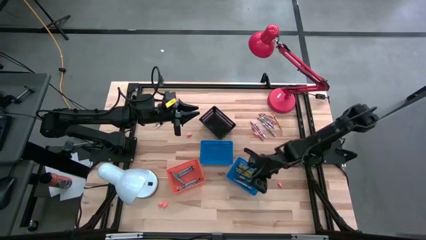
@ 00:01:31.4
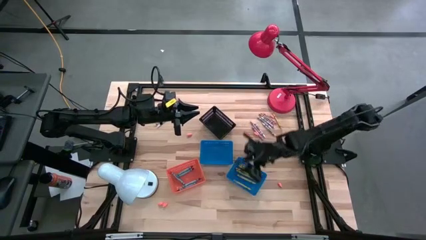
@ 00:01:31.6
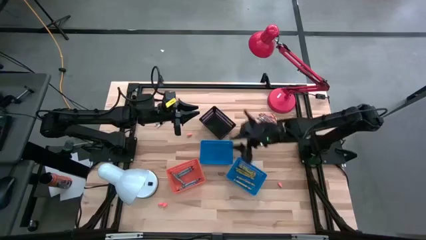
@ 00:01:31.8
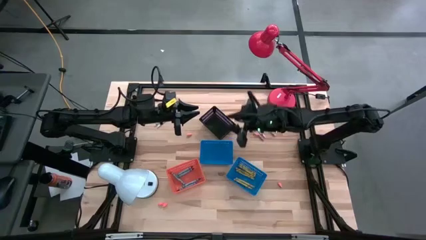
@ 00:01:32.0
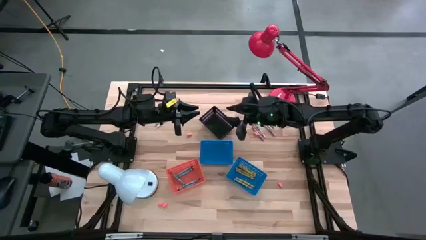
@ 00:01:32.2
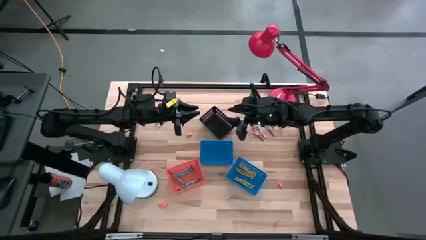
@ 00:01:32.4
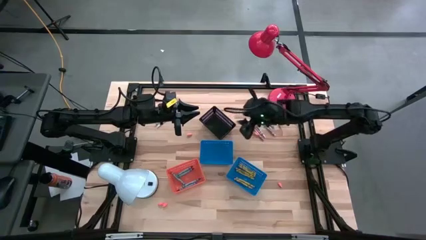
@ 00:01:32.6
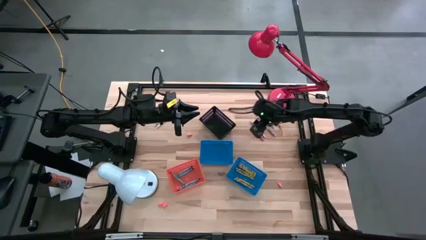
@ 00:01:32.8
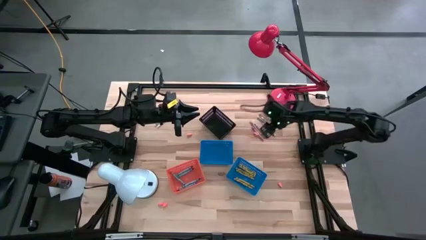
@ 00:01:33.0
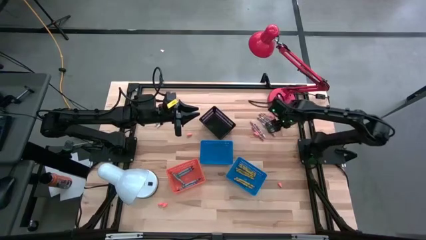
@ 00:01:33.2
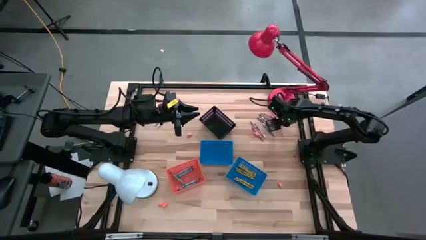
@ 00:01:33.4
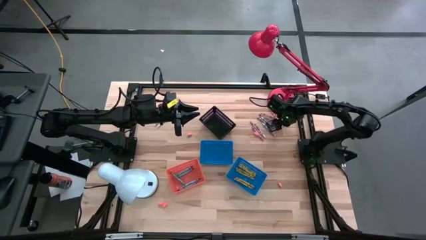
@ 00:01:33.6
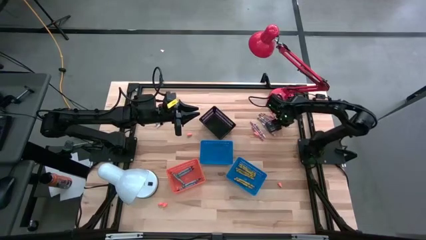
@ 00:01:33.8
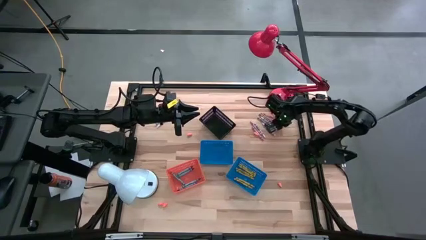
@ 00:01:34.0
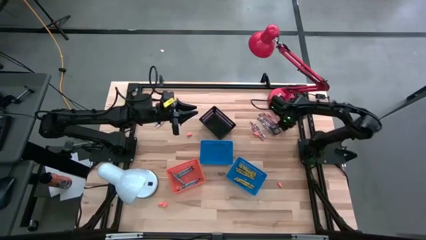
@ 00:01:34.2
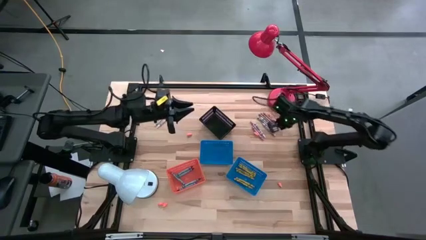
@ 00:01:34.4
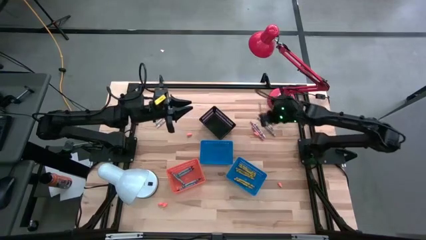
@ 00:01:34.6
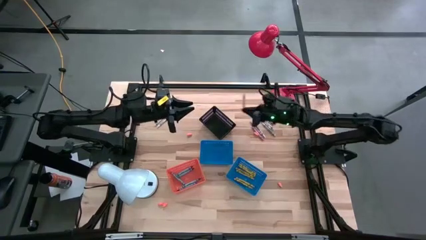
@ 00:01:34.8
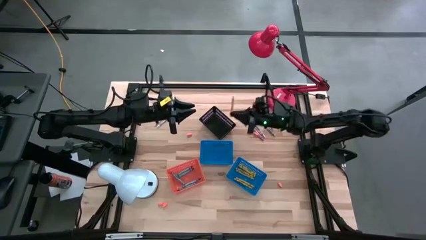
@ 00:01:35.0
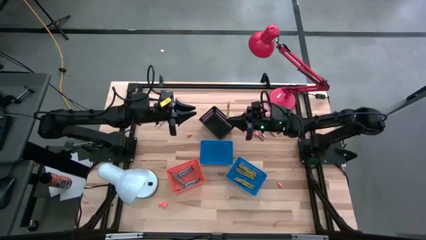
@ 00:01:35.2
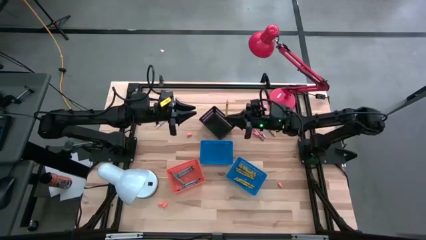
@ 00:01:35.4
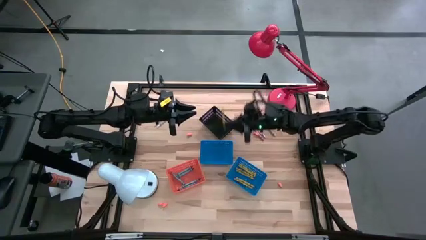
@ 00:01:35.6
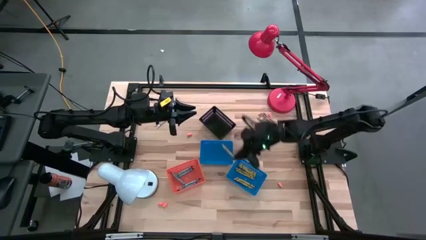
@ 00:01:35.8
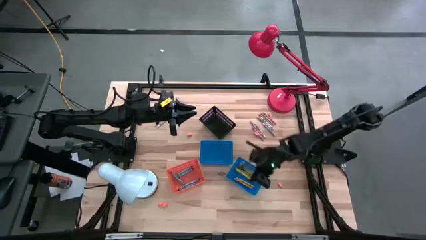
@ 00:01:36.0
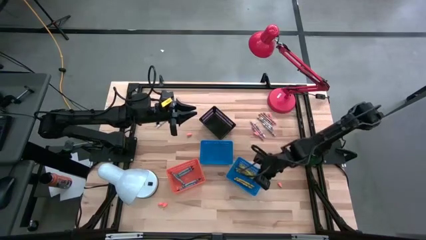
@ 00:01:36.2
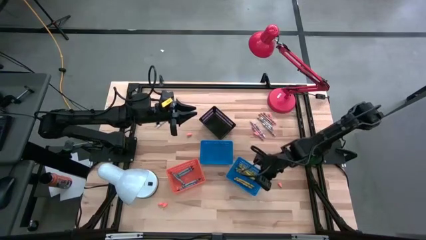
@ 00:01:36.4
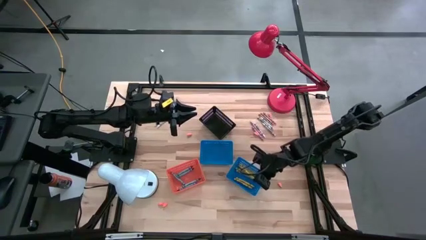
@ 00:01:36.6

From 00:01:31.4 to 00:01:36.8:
Task: Sort crayons
Put the yellow crayon into the right blue bin

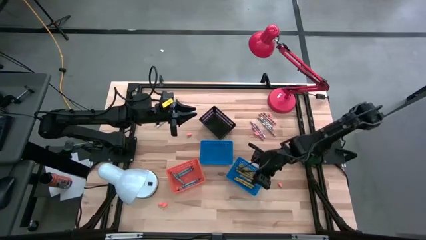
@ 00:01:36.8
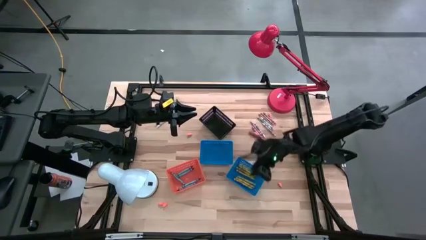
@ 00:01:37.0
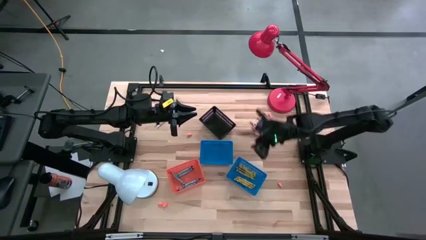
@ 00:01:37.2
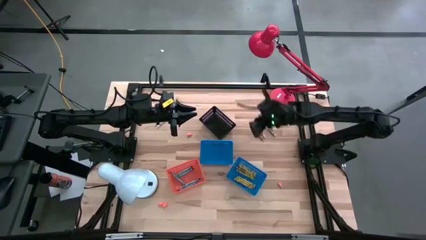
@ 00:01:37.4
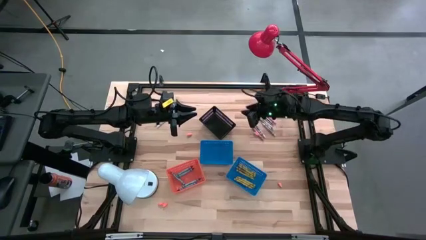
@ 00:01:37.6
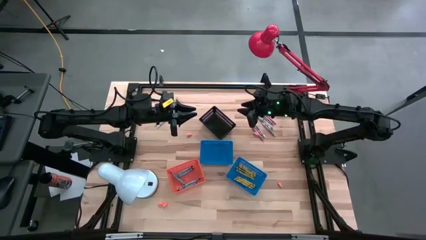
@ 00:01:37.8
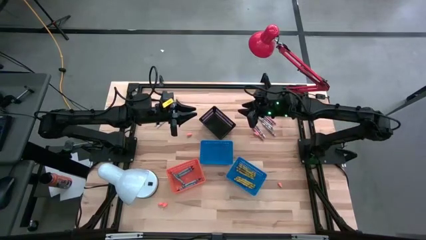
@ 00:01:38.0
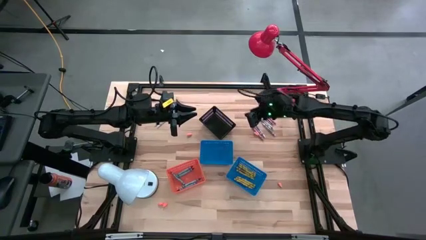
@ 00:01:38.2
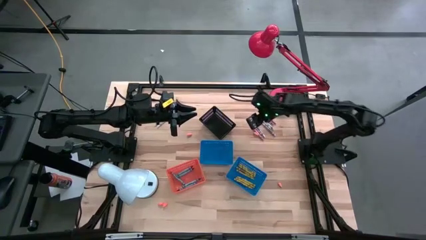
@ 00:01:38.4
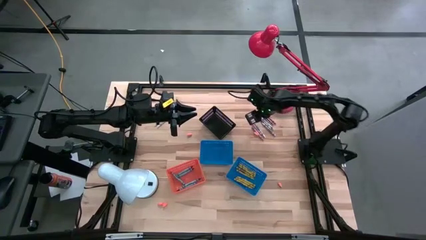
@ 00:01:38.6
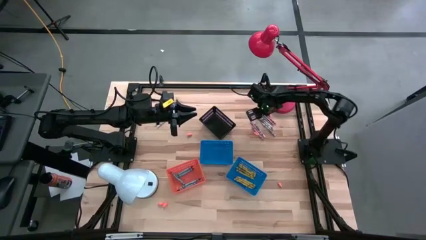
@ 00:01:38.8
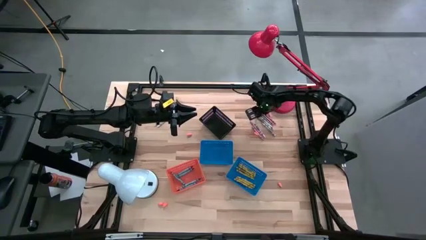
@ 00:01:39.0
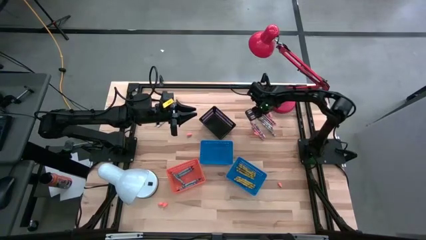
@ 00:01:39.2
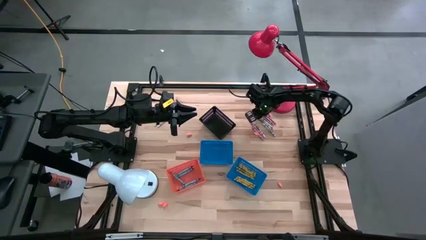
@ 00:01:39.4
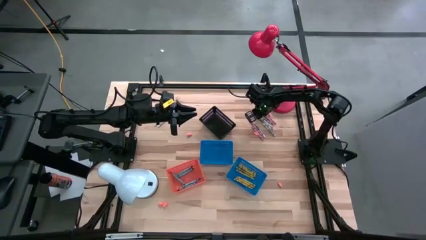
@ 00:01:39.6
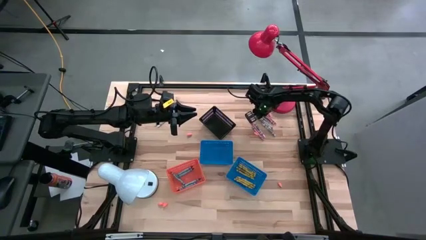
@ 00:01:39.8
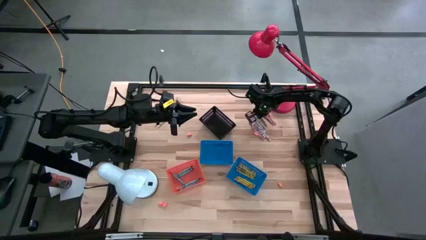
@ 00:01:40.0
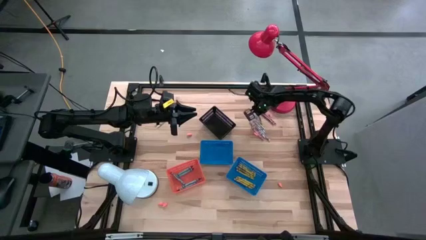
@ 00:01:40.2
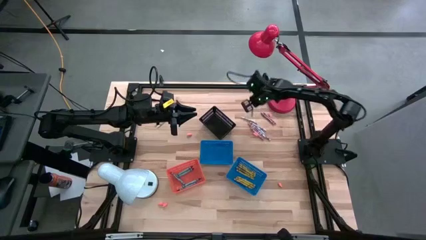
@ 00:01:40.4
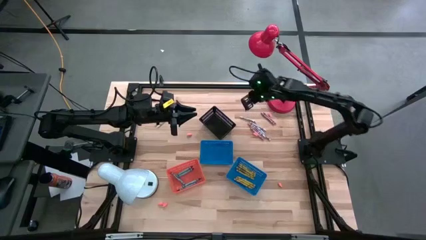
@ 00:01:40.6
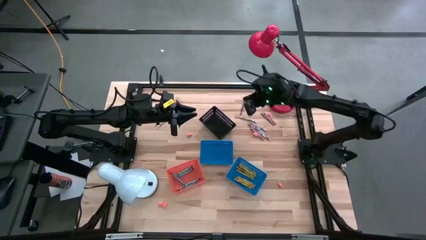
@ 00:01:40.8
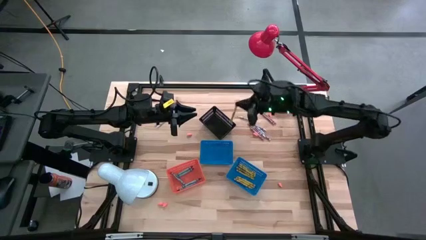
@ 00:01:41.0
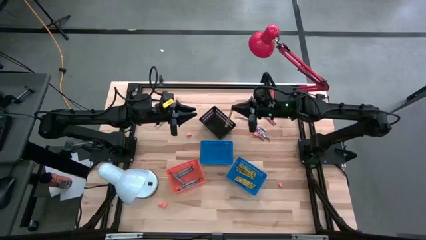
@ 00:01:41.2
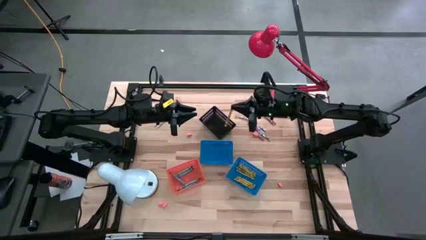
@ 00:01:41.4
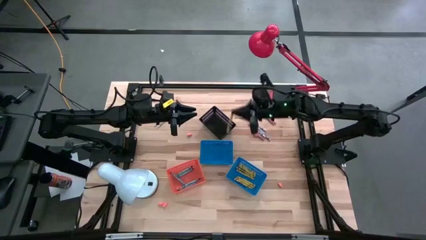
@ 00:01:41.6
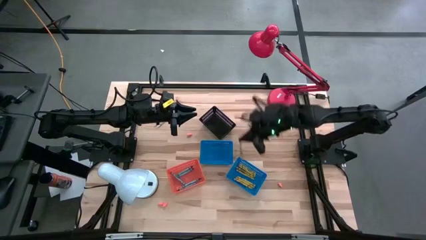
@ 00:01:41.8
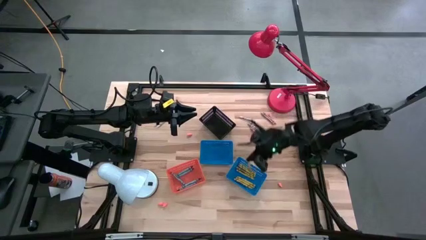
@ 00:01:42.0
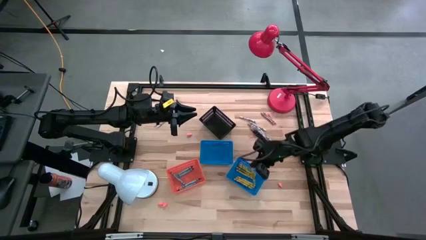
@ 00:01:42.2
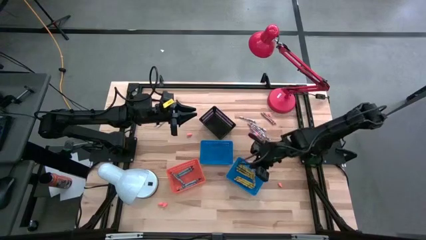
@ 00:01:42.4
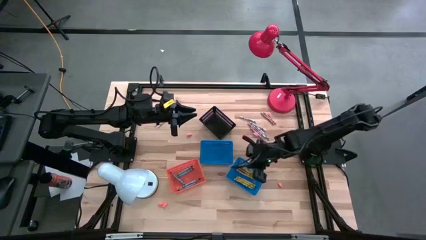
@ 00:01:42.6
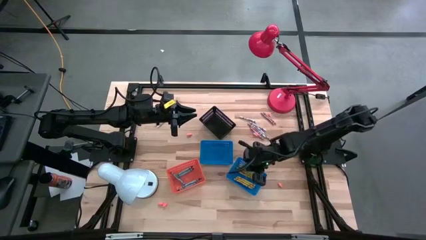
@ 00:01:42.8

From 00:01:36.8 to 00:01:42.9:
Put the yellow crayon into the right blue bin

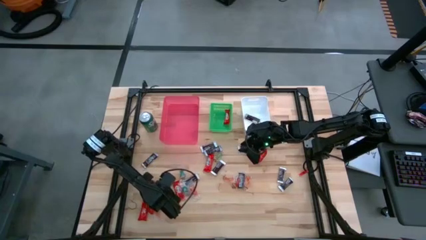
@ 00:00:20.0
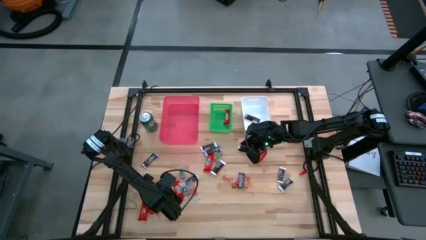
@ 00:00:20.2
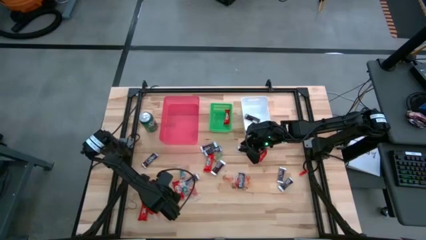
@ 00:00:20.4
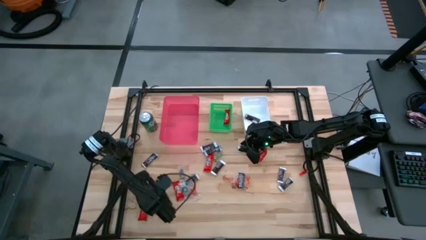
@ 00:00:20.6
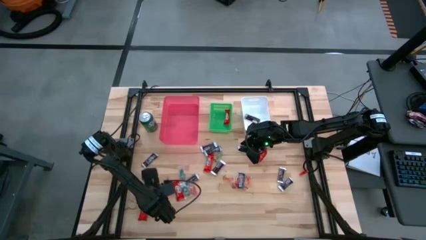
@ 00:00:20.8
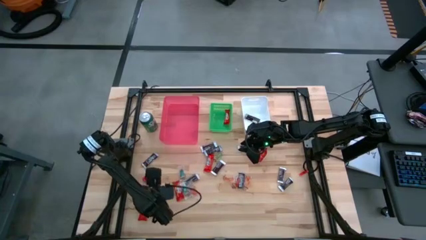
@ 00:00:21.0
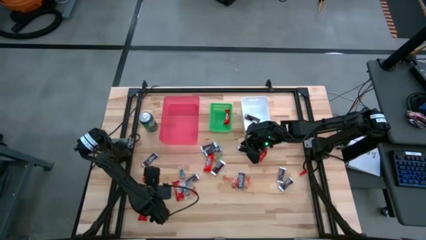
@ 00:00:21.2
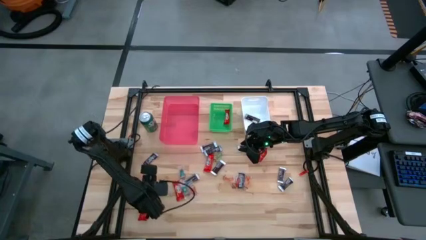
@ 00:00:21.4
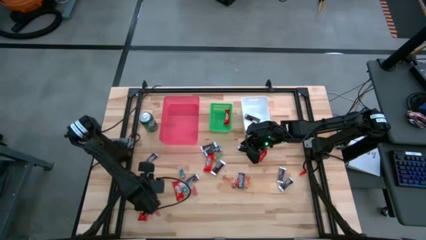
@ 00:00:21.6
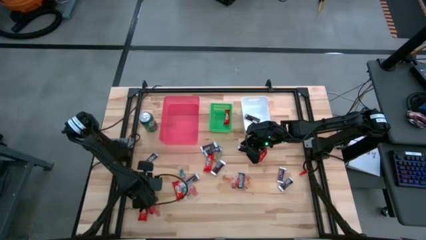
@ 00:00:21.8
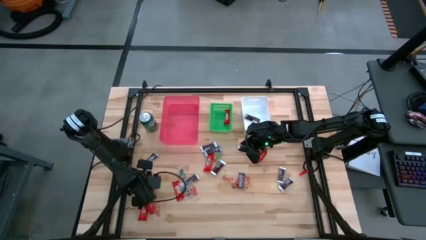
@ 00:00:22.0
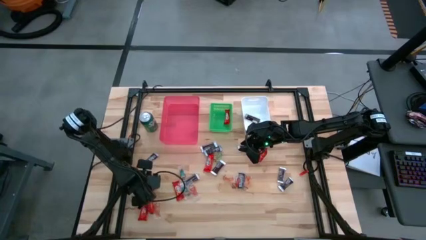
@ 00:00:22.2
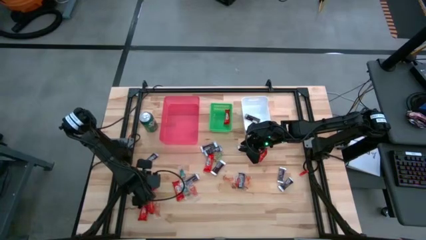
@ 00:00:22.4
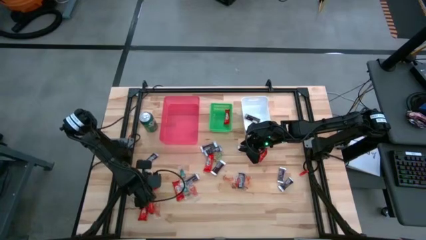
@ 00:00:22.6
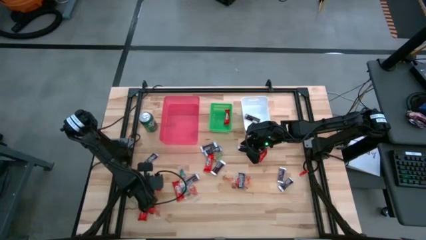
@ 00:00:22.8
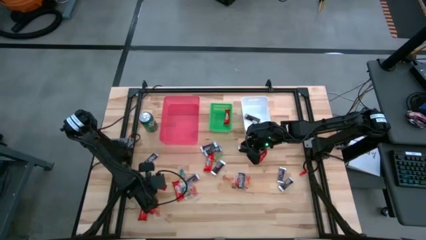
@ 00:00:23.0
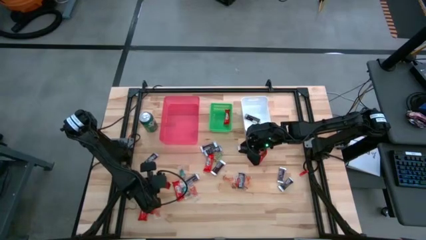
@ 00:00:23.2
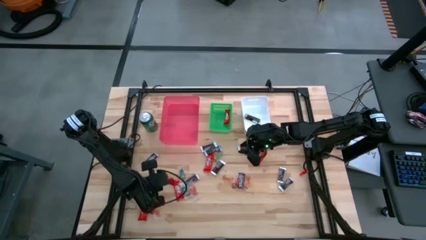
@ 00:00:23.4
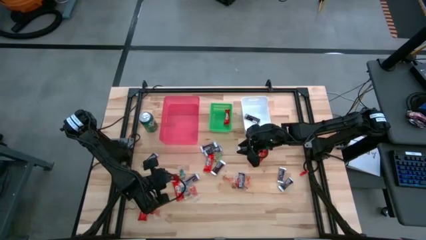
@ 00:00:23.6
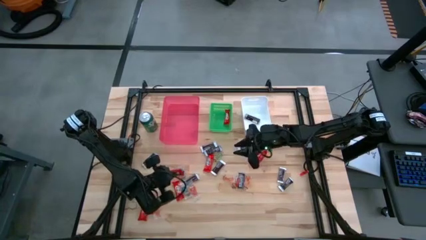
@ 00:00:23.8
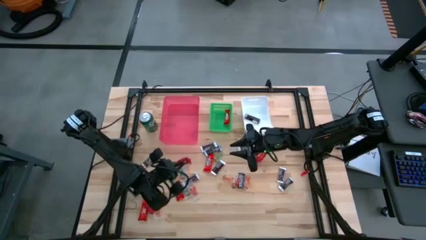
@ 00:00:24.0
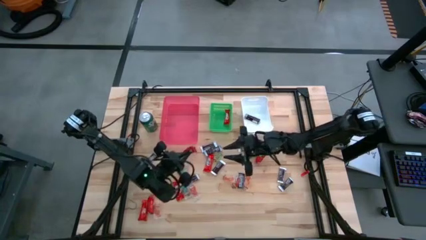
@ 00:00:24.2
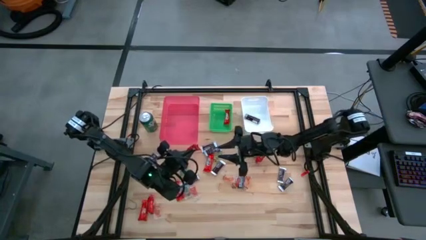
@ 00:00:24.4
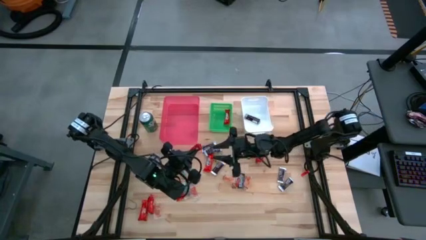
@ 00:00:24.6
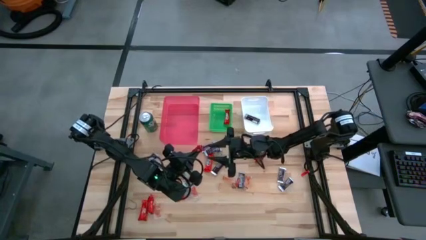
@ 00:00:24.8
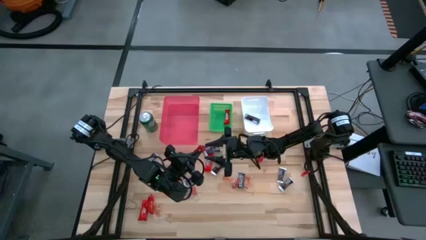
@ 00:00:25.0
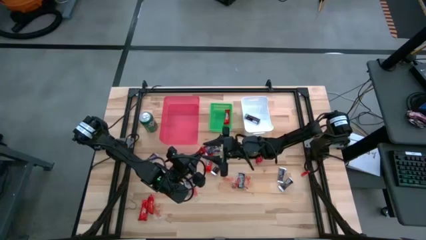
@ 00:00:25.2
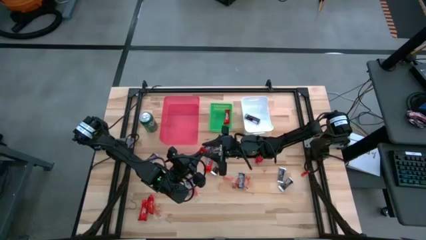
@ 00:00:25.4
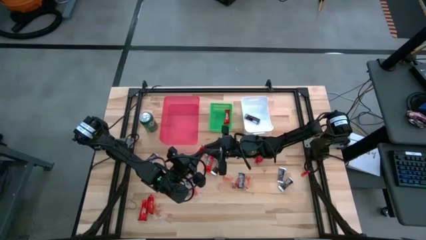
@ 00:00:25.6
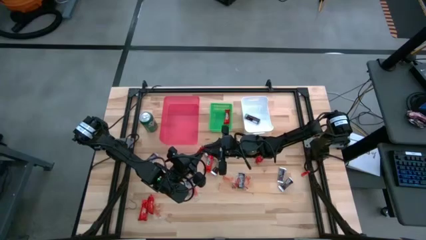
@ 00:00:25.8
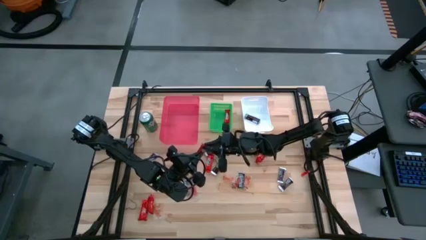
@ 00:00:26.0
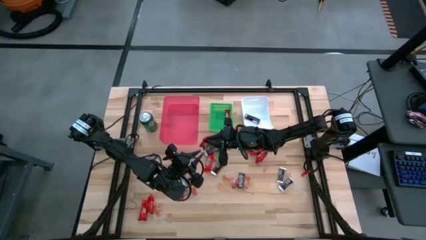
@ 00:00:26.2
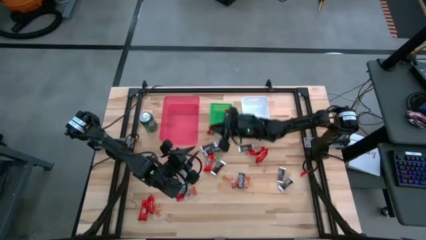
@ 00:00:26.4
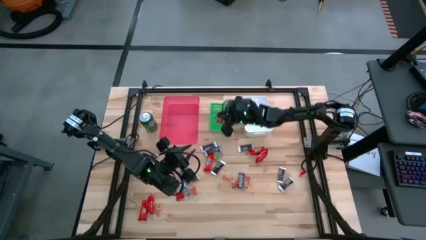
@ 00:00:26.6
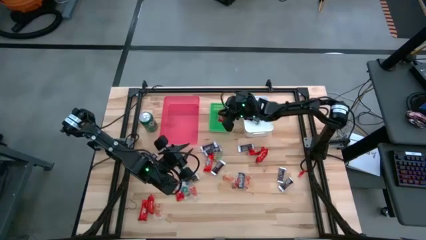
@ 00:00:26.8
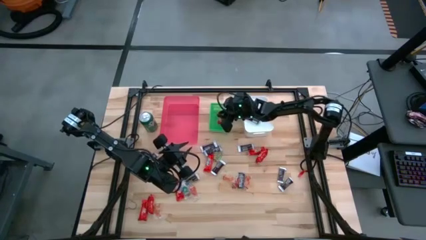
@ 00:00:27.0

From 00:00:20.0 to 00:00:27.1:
Task: Sort candy
Put the red chocolate into the green bin
